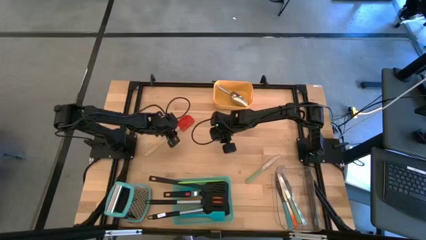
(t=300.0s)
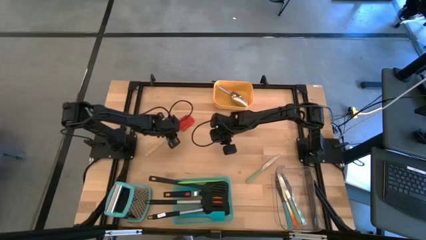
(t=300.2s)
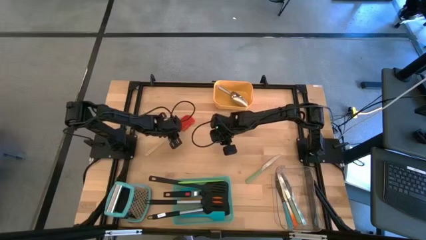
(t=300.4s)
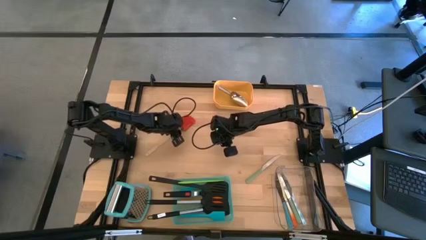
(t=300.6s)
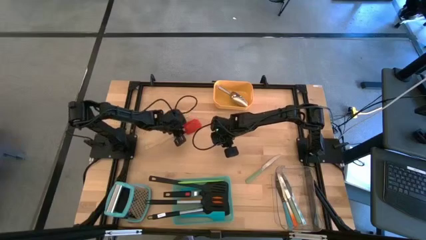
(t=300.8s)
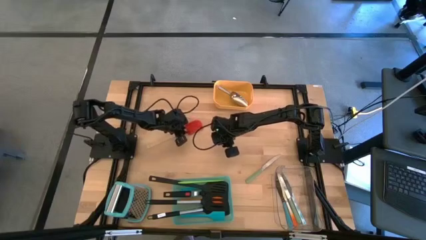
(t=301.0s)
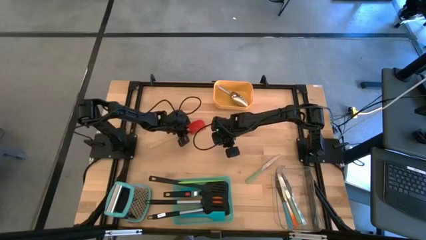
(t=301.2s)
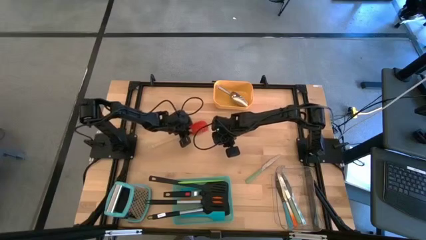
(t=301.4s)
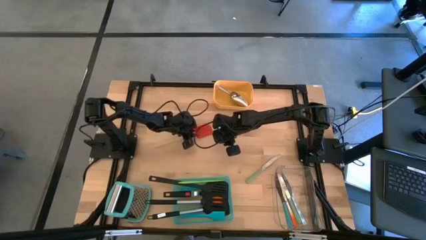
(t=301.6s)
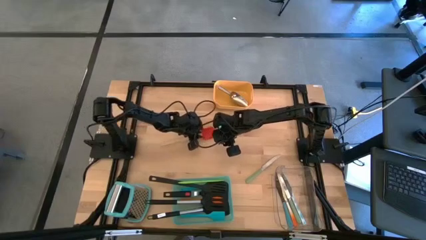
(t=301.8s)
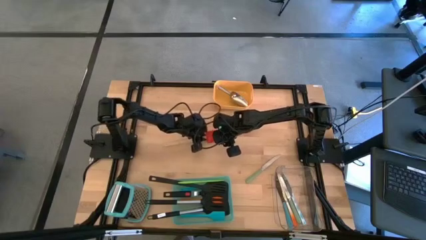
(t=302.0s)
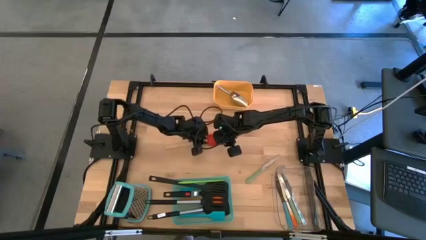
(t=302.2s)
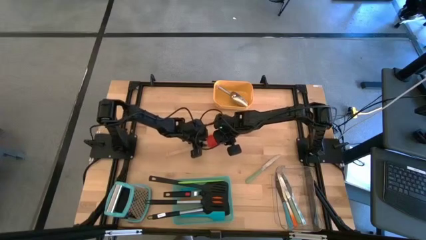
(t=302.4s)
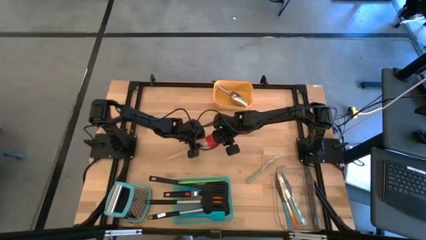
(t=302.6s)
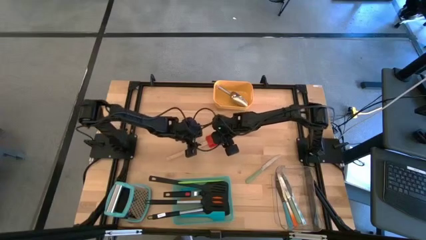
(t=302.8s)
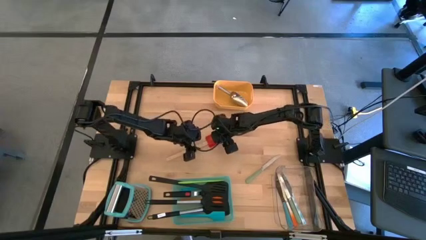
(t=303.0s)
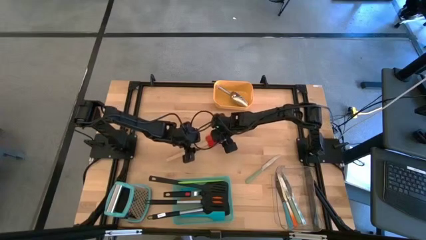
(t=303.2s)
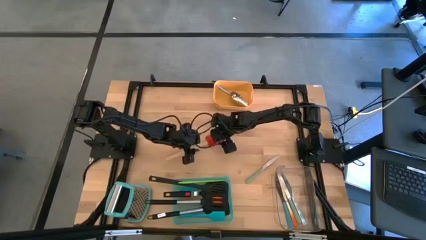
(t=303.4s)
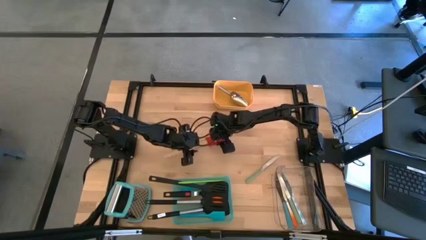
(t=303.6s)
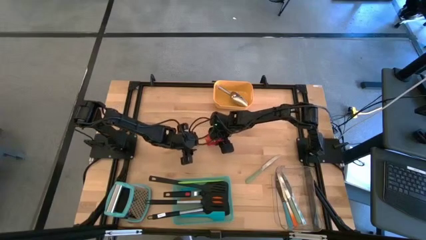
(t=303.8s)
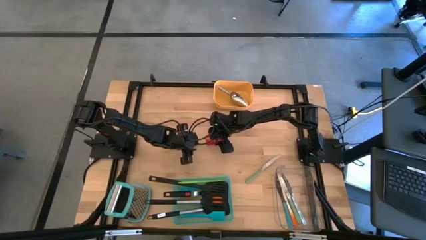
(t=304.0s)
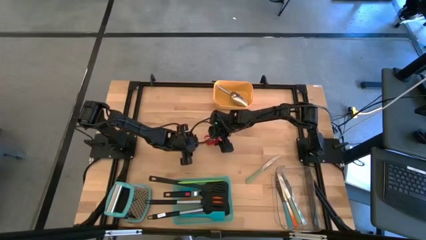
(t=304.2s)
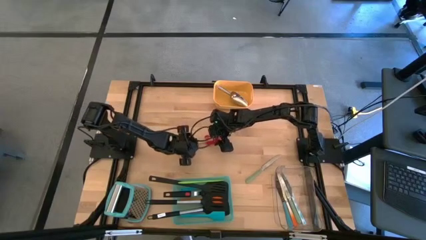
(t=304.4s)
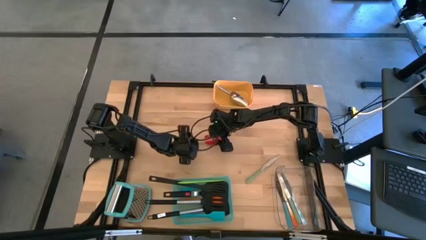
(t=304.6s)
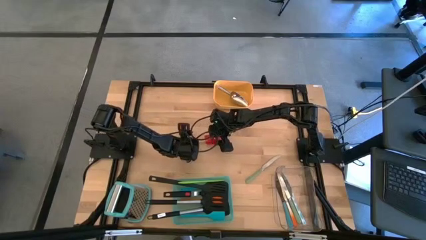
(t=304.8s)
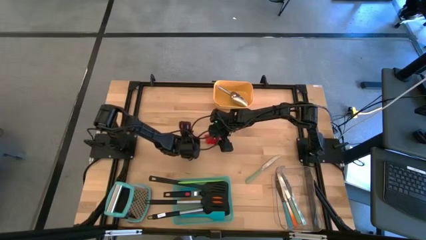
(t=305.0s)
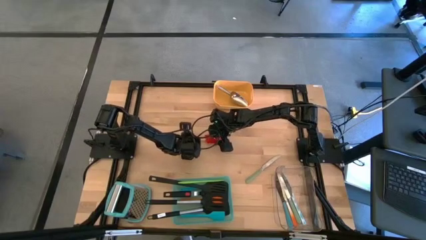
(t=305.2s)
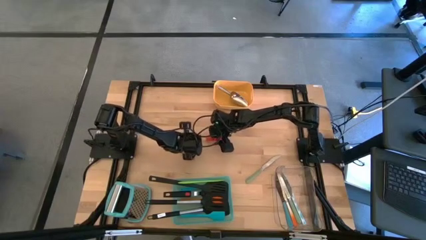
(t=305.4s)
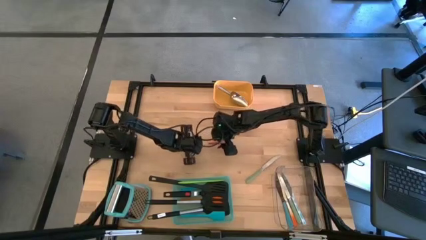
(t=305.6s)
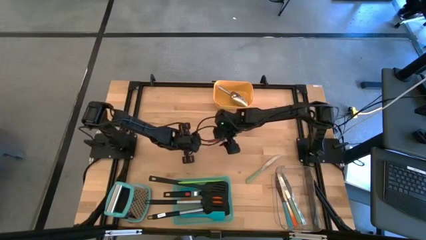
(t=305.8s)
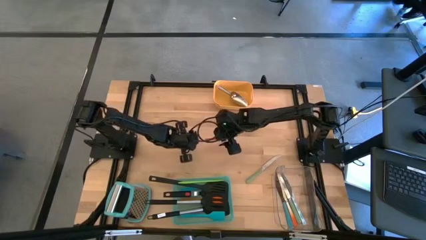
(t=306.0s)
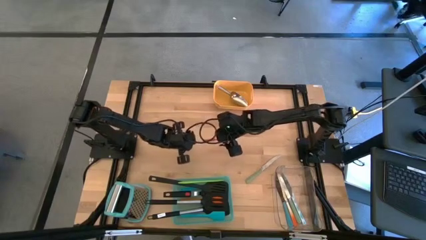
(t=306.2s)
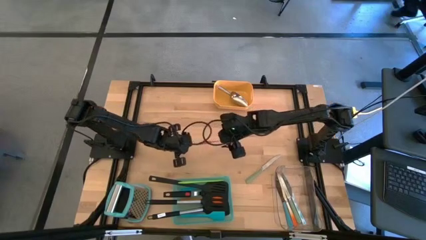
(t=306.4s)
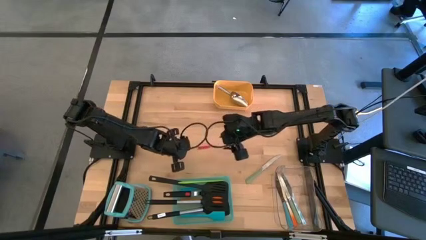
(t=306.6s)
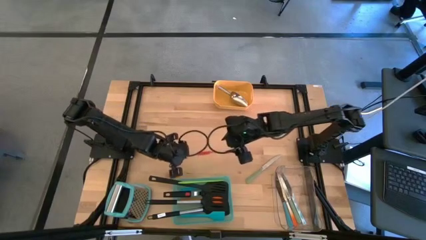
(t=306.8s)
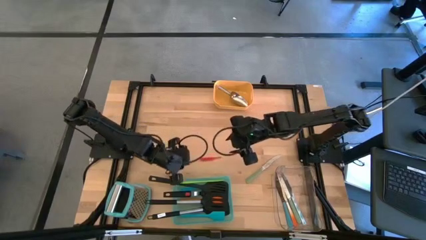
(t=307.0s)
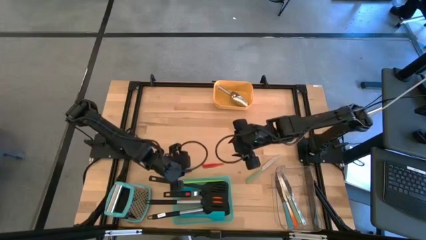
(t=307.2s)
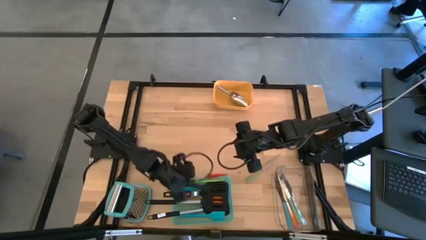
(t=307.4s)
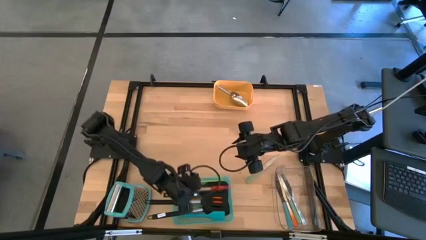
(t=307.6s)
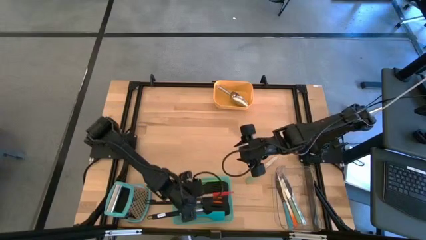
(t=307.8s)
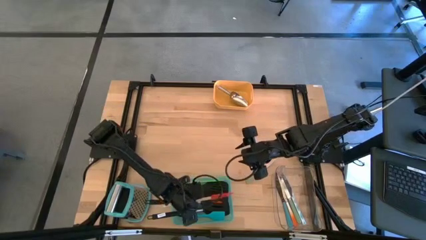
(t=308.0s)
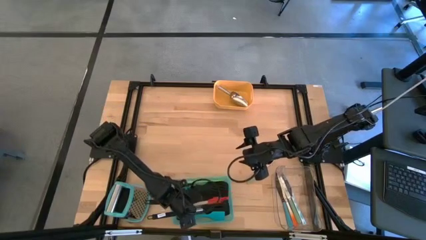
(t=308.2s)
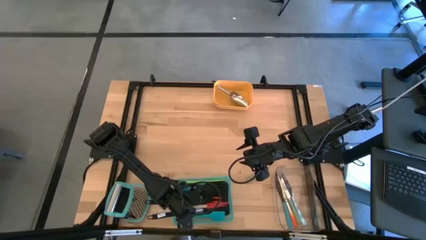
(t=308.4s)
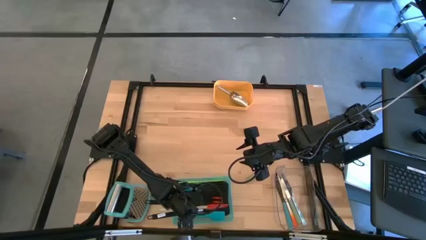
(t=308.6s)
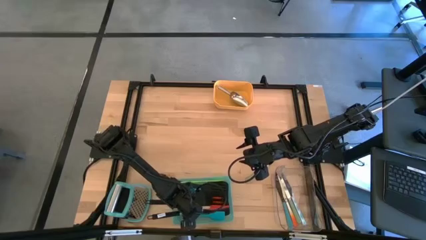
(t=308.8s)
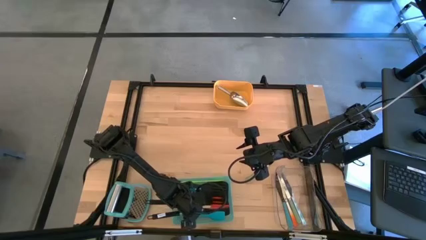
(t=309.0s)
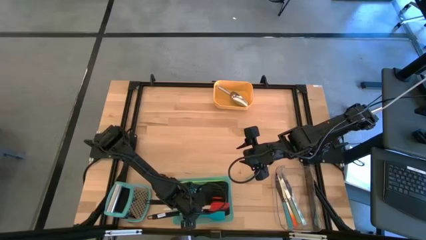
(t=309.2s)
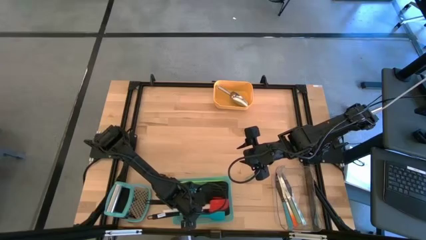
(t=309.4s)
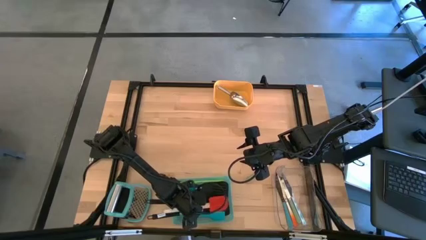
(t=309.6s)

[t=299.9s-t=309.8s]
Task: Pick & Place Kitchen Items
Put the red spatula into the blue bin
